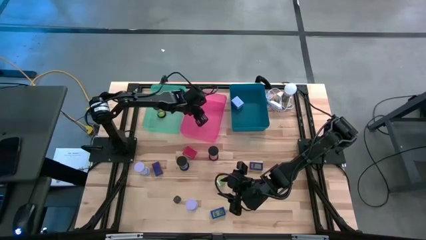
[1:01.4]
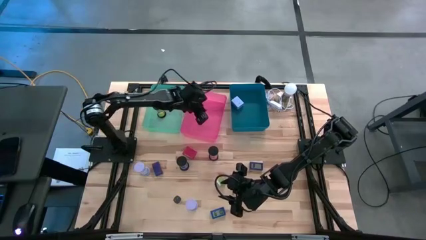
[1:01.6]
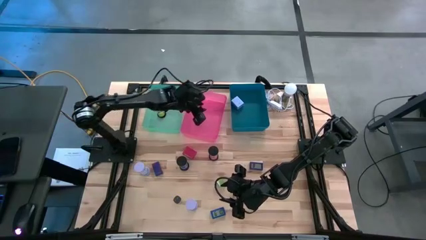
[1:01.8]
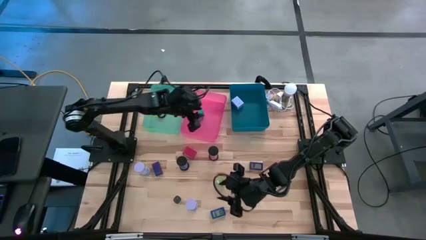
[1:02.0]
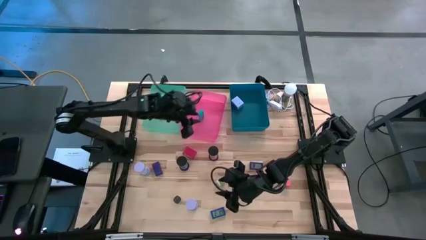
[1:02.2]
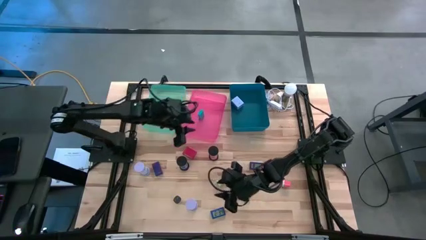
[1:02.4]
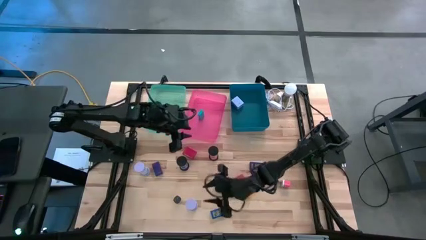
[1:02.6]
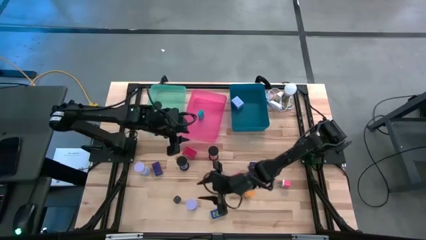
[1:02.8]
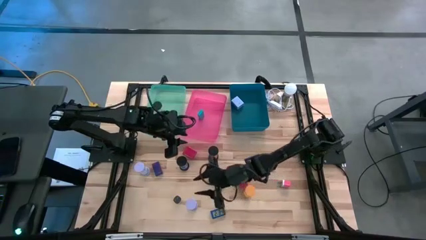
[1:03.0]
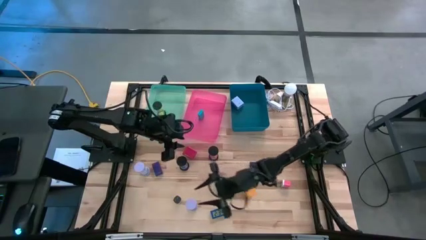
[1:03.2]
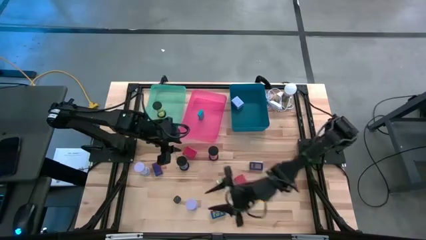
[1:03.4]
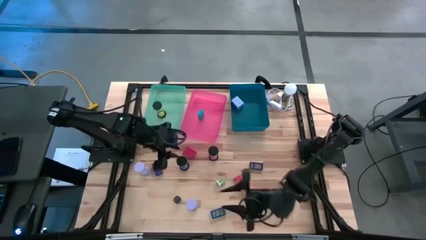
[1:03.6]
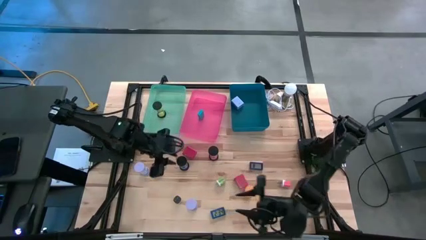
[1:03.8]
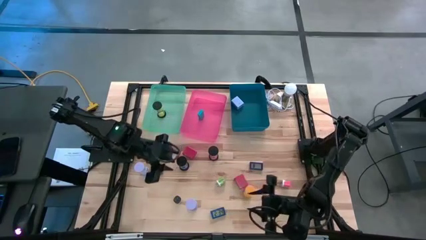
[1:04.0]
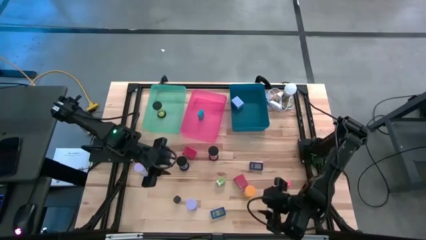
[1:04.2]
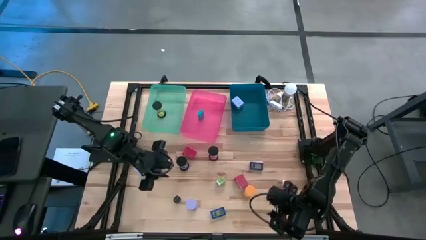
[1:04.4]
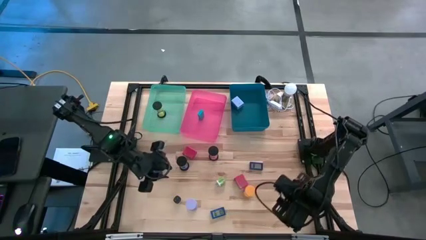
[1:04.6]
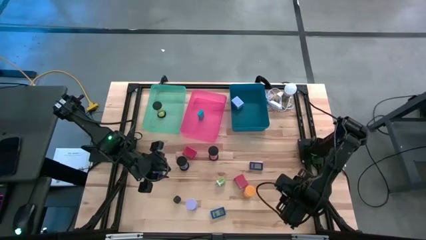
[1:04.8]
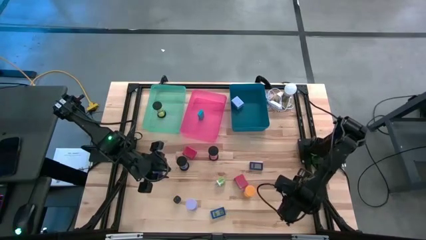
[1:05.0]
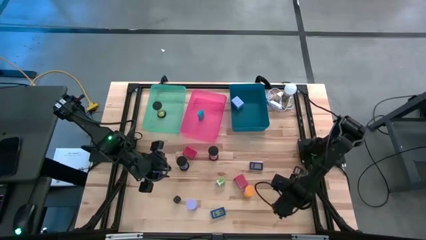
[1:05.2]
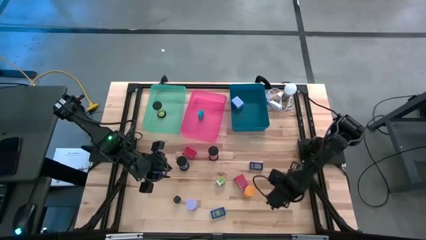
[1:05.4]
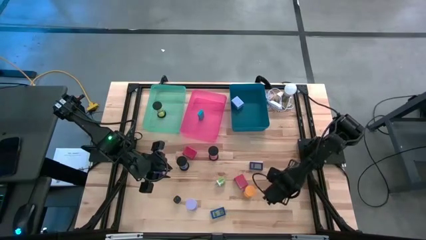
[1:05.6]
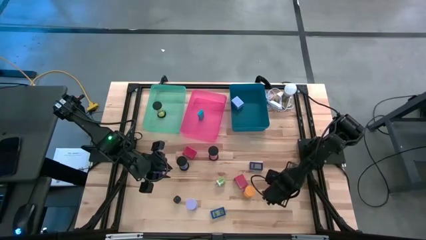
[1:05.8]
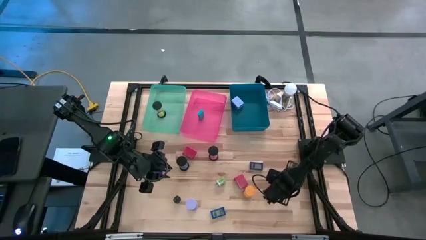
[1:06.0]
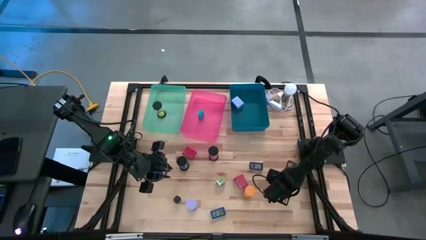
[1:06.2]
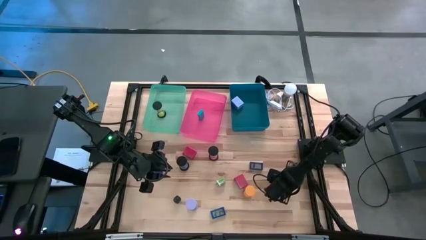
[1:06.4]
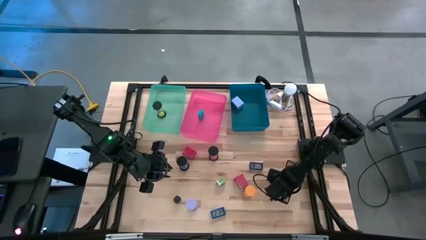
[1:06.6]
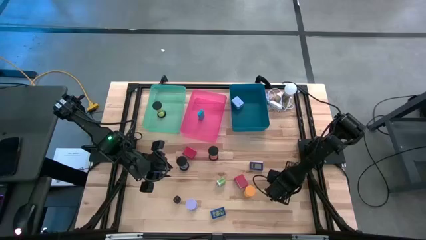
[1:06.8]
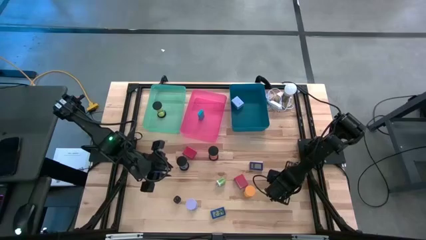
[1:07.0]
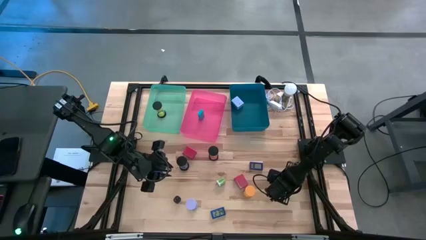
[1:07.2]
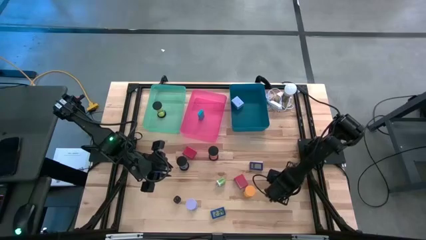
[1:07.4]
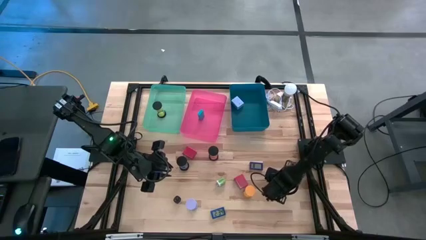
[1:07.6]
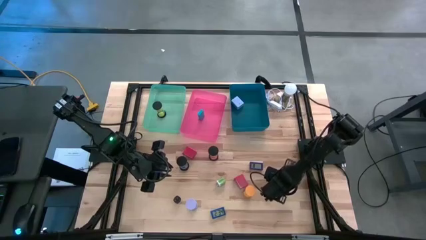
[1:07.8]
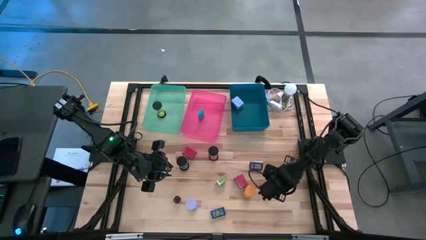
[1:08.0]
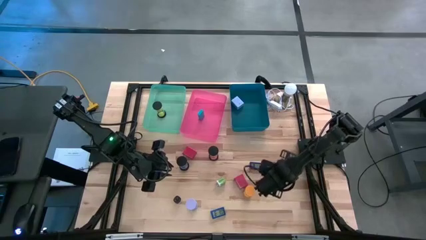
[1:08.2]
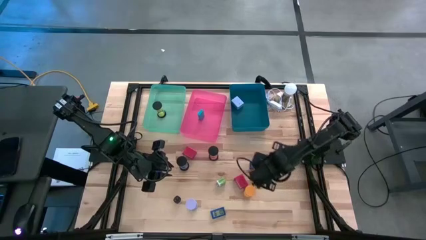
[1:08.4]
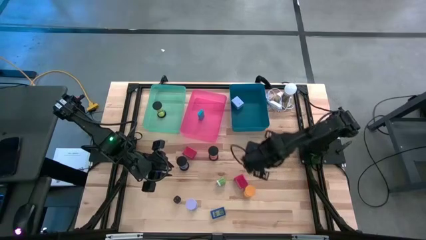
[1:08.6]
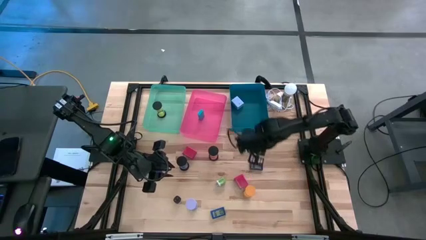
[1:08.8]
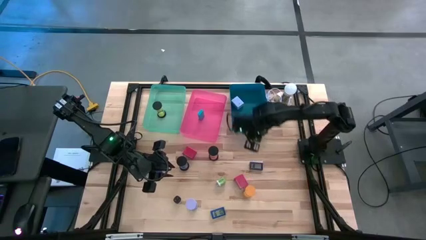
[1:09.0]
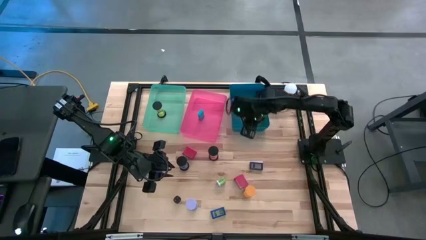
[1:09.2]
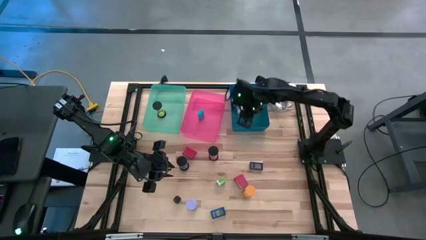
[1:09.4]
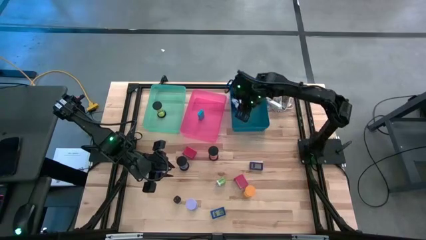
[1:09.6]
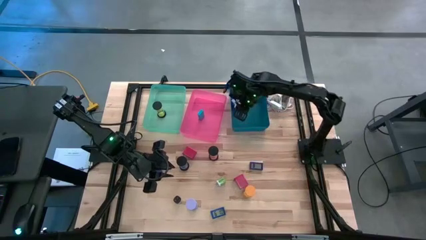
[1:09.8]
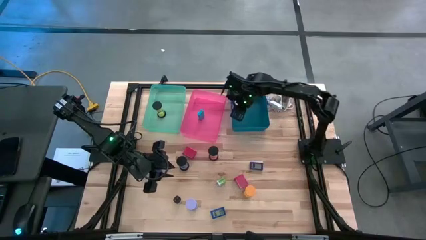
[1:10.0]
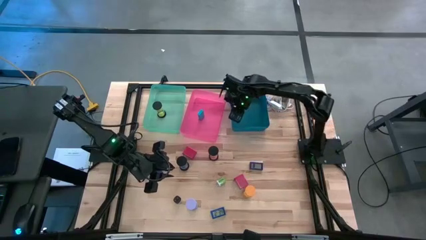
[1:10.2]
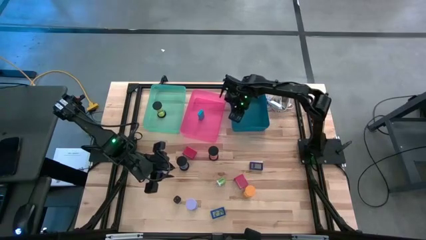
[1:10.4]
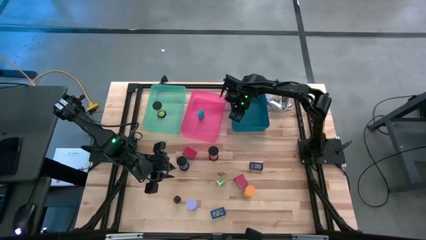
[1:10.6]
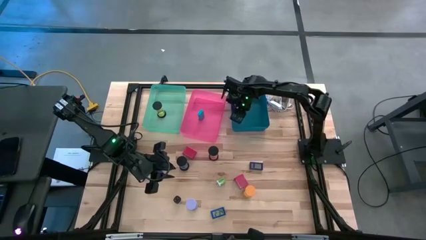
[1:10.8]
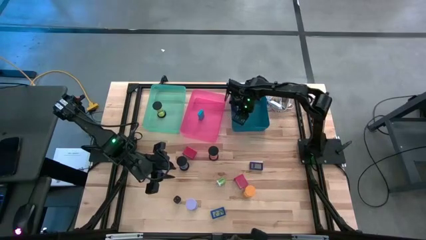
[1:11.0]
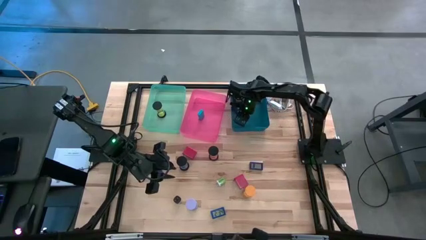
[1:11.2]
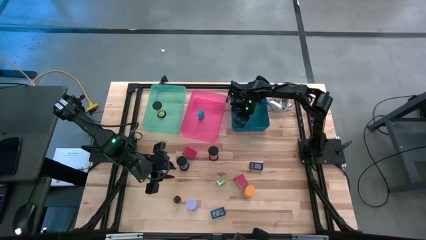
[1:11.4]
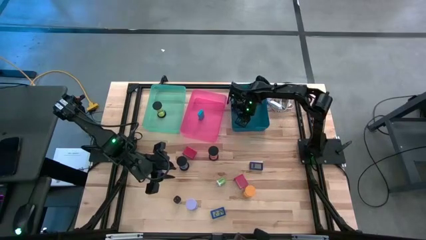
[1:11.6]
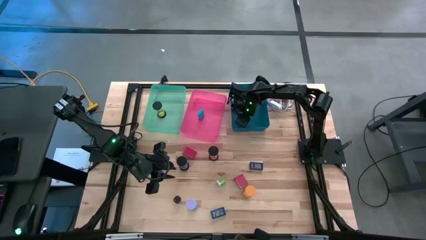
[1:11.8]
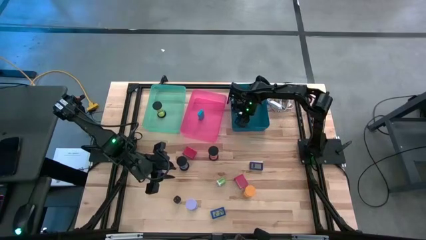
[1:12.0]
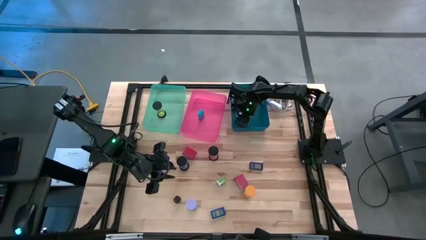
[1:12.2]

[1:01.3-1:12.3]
Task: Pick & Place Office items
Put the pink charger adapter into the blue bin
